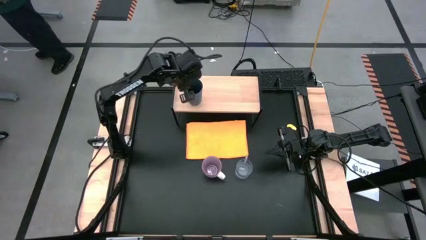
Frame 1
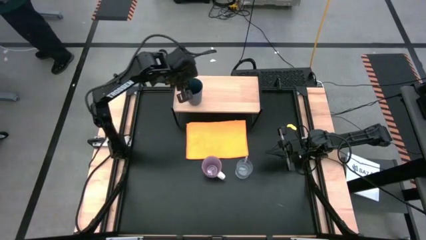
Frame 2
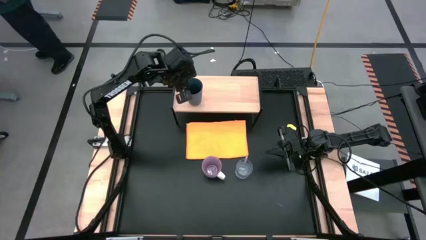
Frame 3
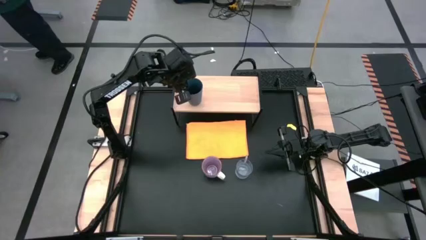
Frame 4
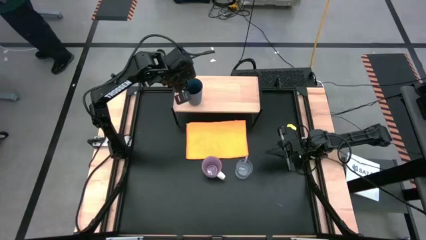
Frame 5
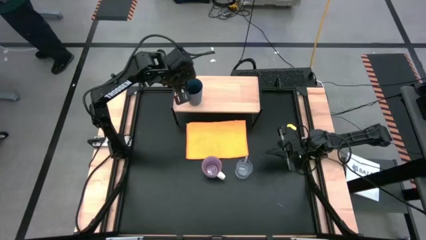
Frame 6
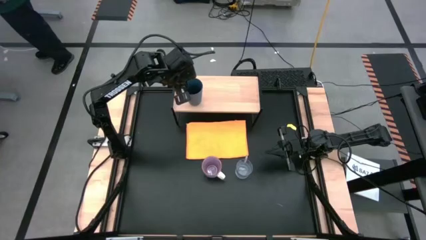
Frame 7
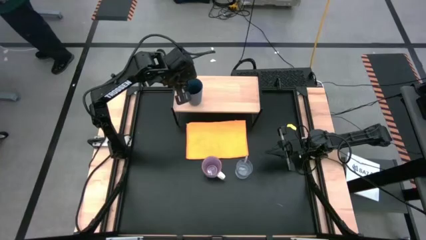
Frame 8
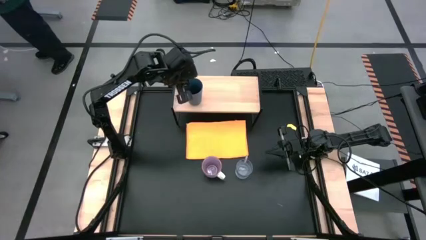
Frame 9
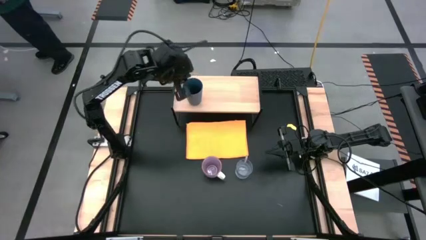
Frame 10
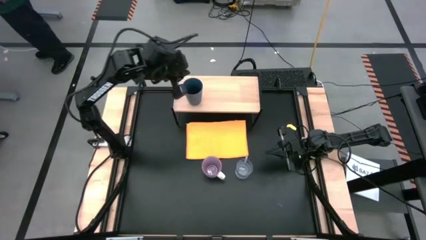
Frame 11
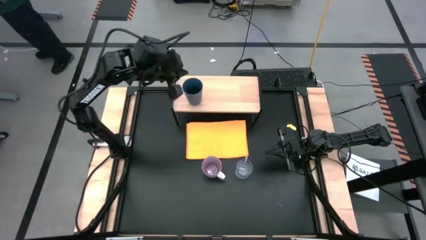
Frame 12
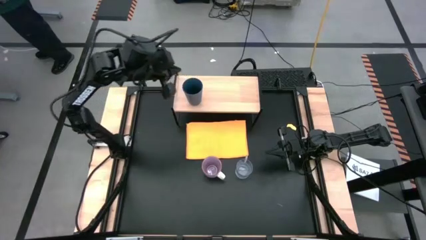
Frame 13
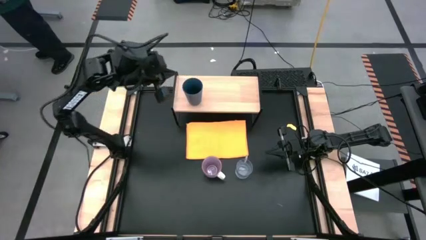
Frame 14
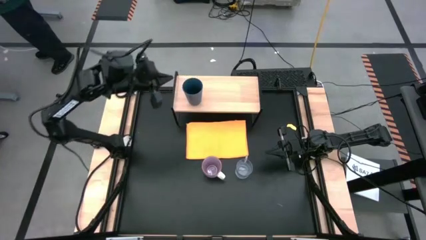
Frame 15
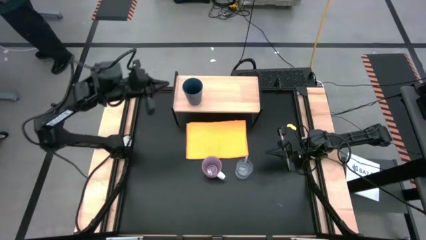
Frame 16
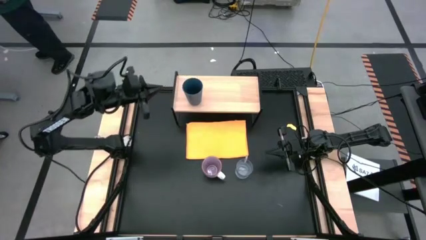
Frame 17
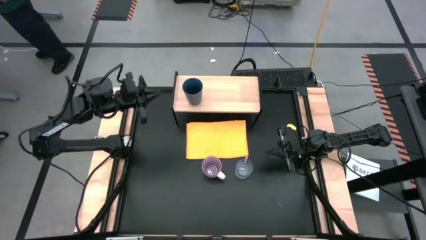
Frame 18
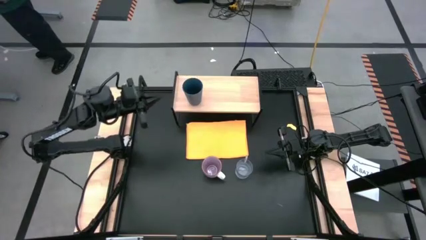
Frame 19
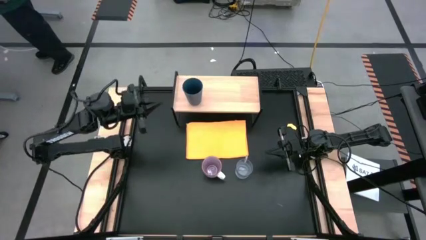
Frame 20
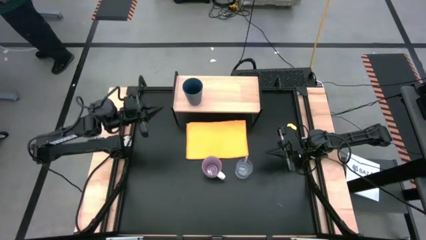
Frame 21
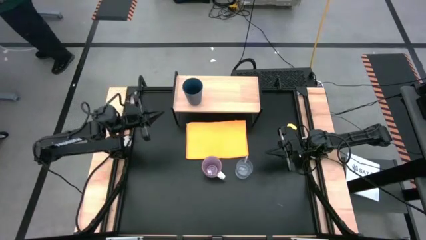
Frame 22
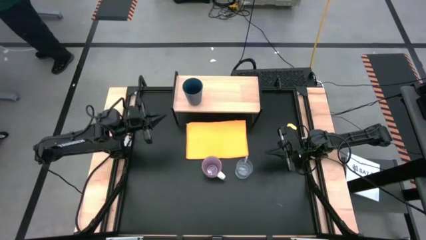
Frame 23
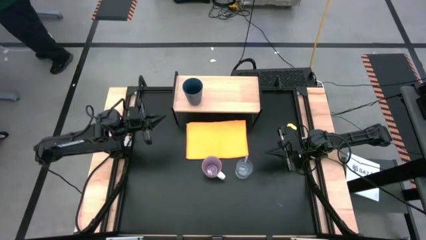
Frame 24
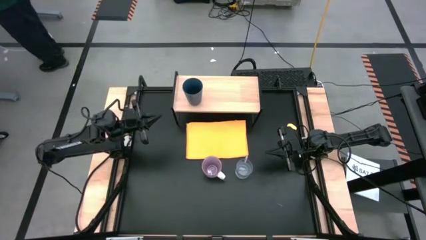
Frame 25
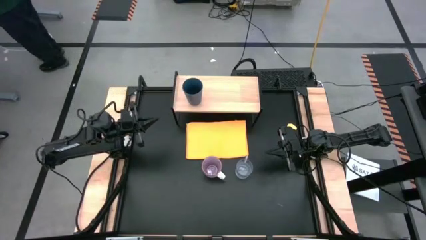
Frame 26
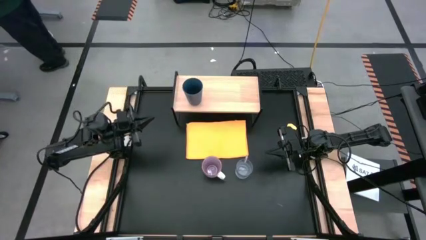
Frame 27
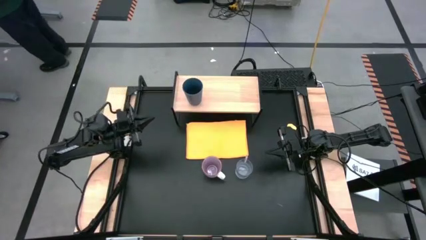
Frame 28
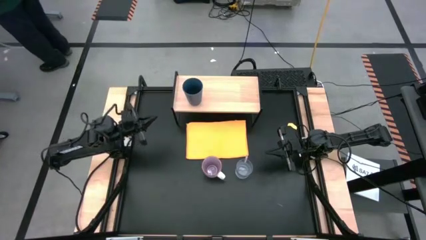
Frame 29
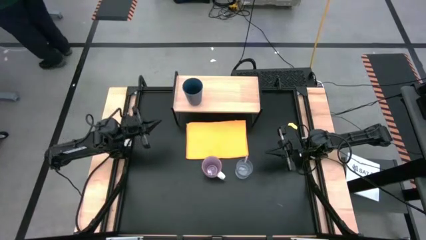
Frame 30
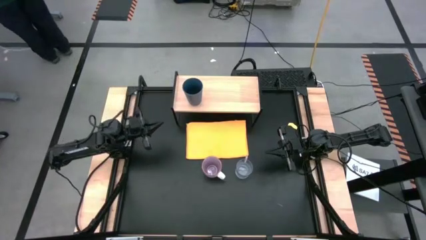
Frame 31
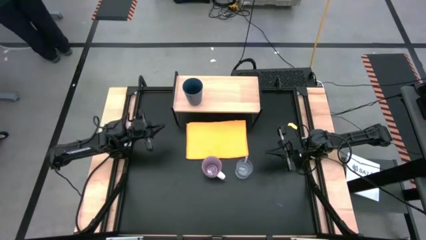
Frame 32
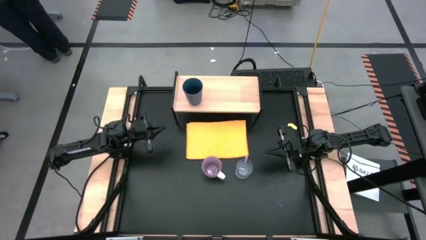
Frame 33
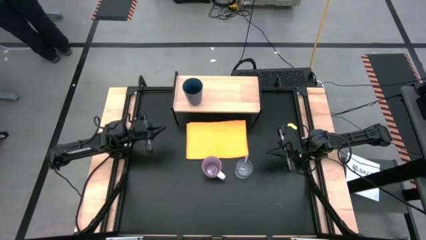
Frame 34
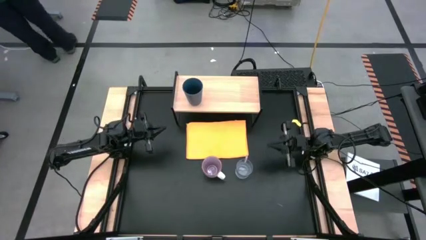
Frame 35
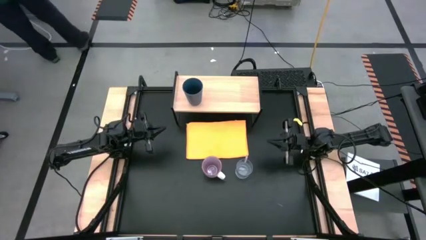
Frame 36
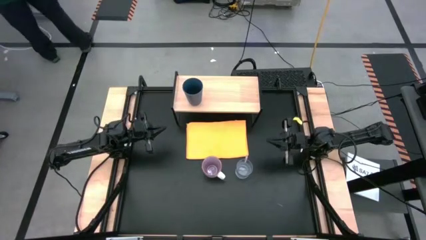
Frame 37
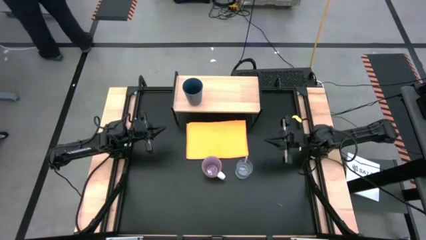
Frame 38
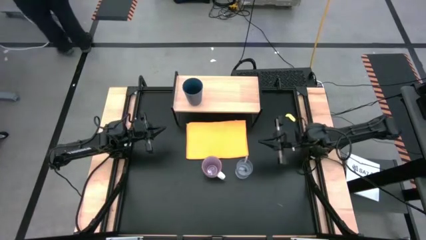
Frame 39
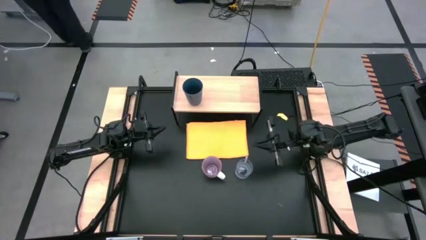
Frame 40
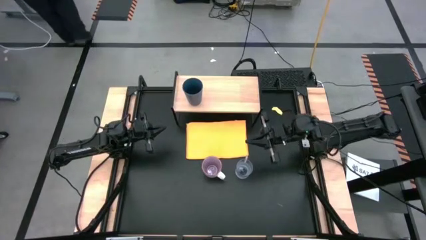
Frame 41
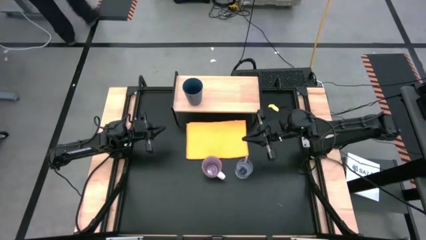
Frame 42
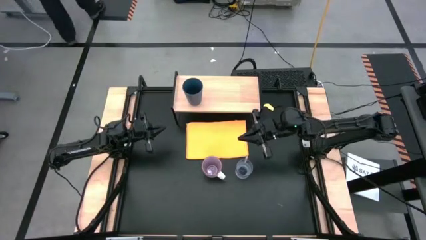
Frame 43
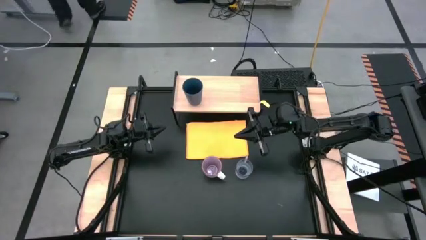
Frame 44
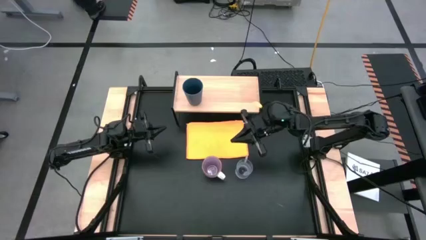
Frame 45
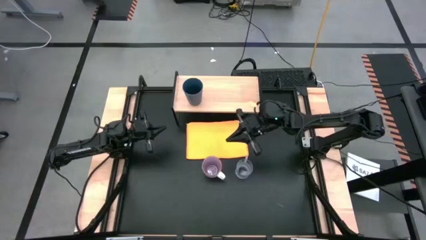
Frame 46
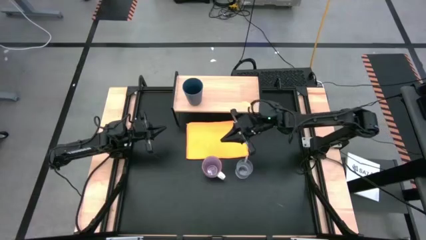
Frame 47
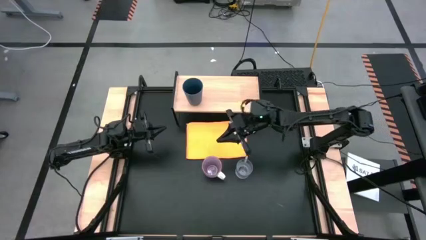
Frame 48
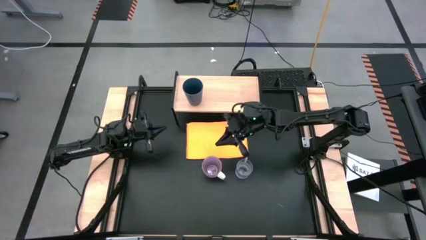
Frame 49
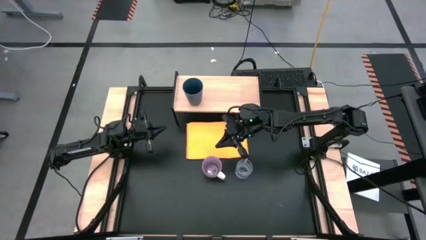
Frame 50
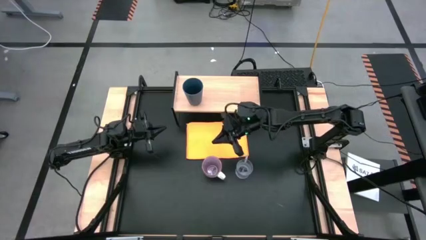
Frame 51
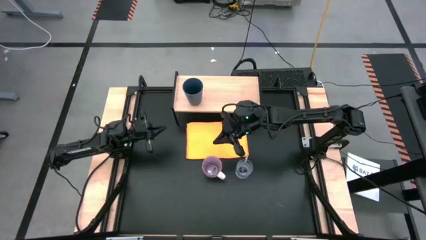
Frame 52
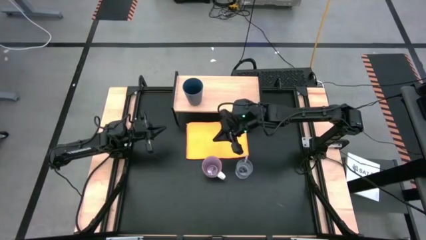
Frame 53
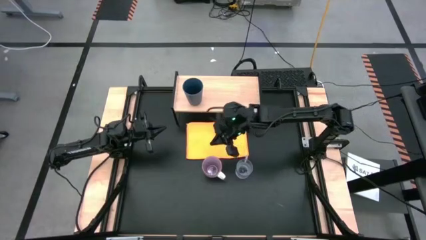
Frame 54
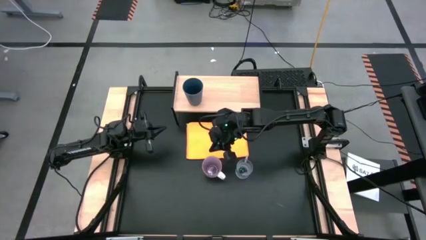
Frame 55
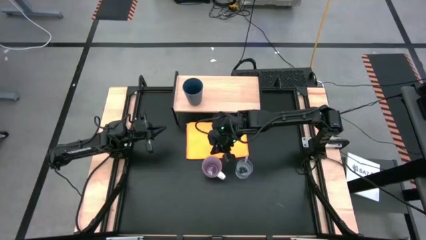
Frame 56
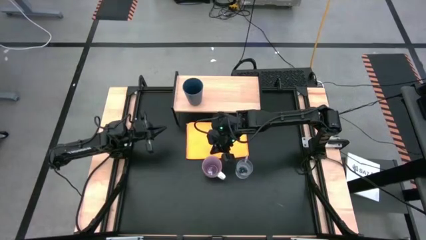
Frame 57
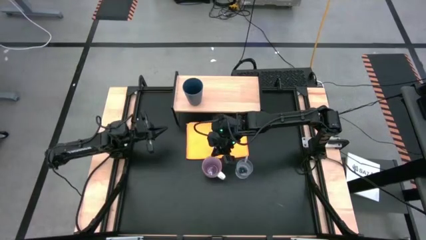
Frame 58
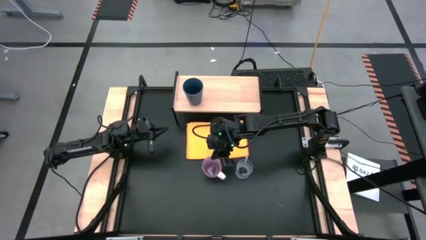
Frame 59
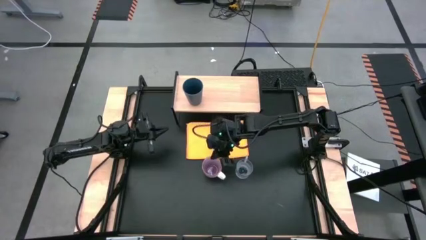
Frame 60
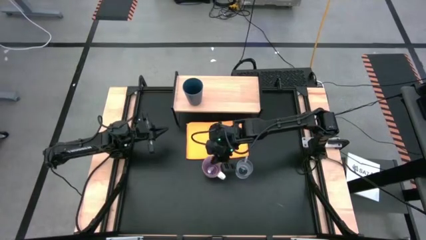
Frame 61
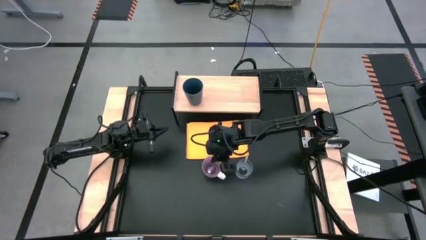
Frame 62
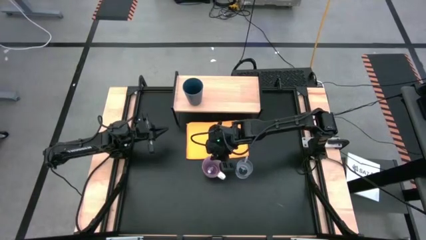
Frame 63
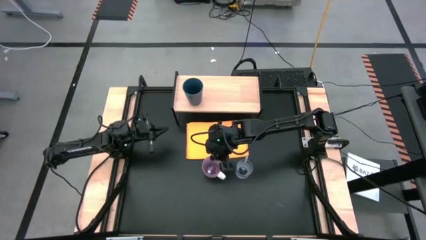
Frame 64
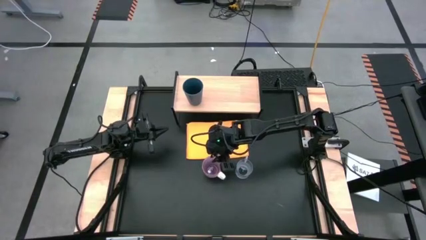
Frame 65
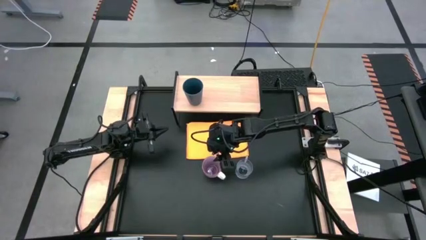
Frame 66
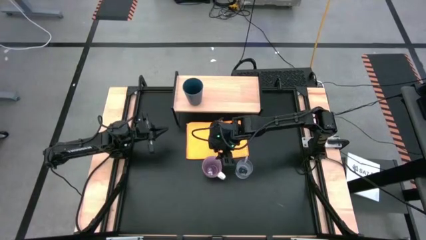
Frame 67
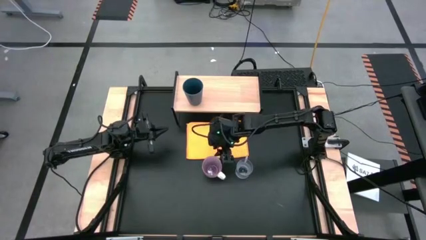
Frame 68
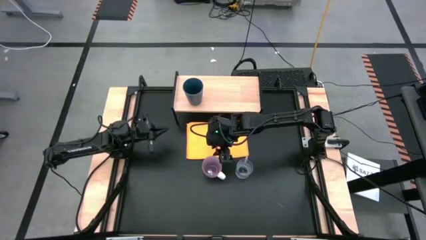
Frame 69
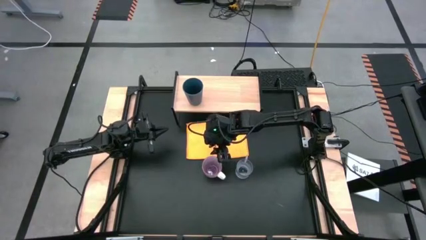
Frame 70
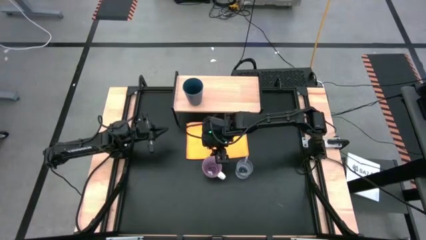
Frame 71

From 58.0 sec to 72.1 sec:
Task: Stack small to large cups/mugs on shelf
Put the purple mug on the shelf

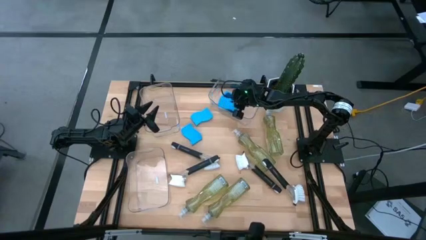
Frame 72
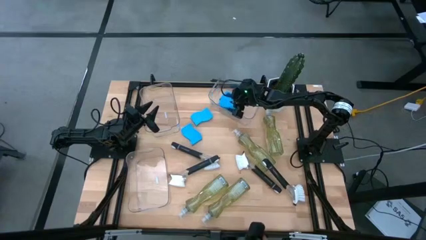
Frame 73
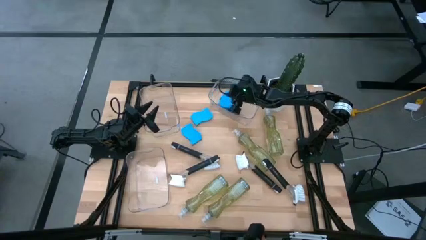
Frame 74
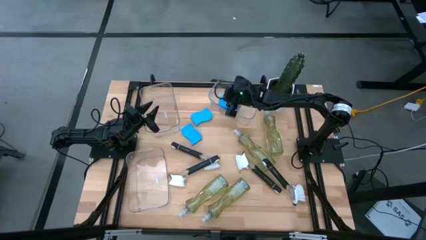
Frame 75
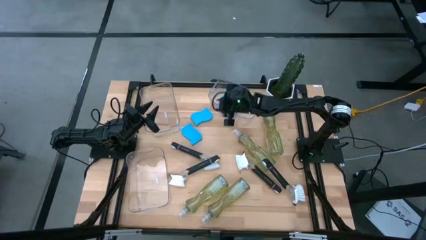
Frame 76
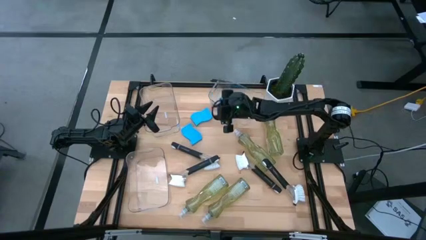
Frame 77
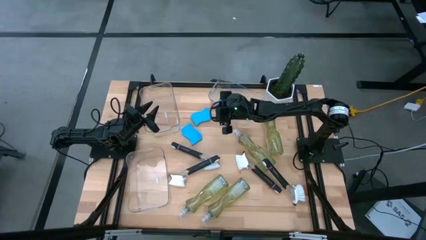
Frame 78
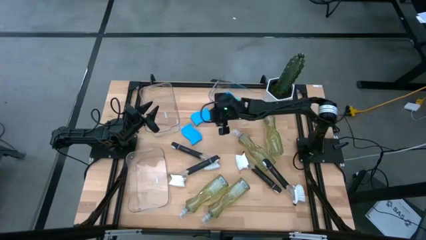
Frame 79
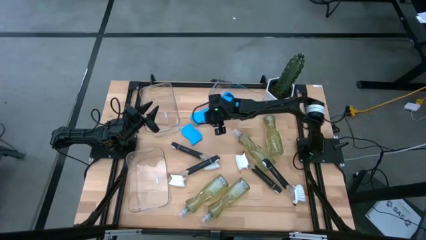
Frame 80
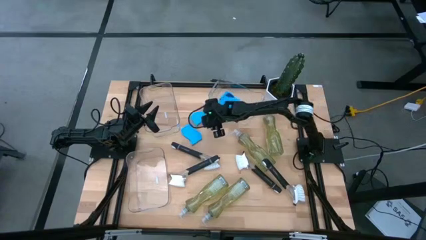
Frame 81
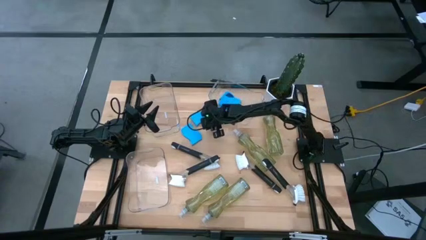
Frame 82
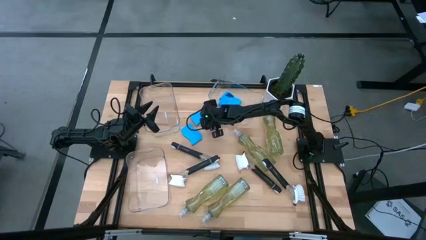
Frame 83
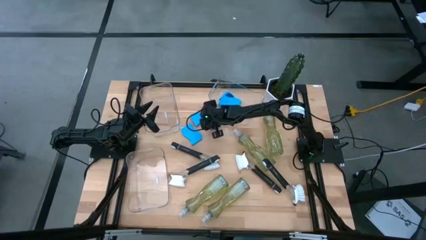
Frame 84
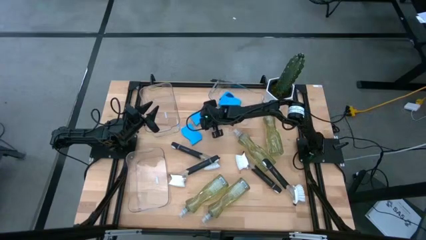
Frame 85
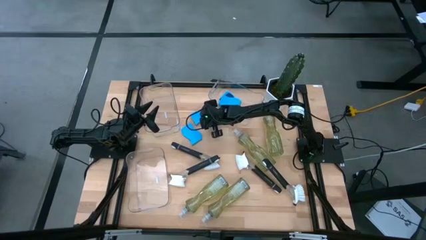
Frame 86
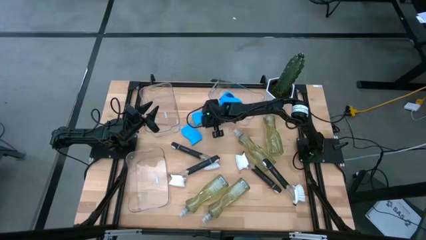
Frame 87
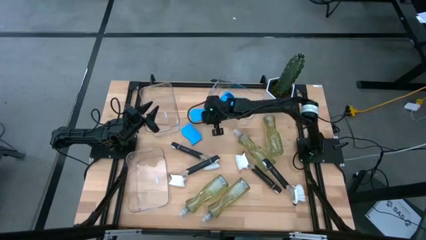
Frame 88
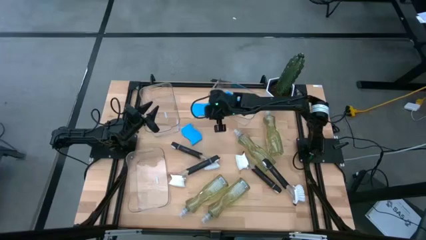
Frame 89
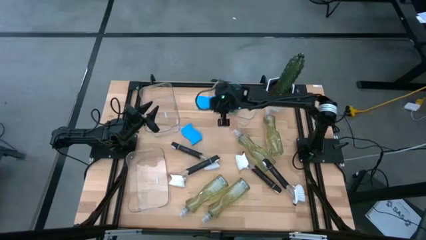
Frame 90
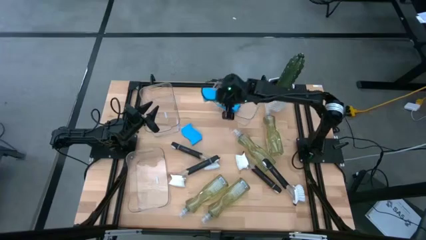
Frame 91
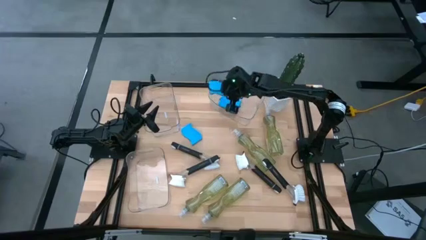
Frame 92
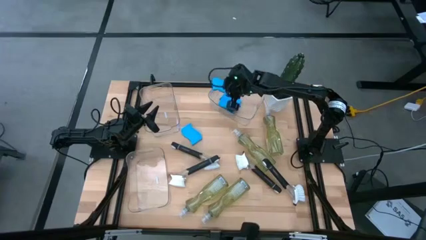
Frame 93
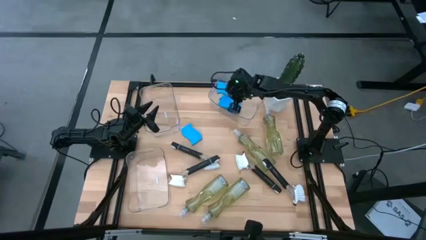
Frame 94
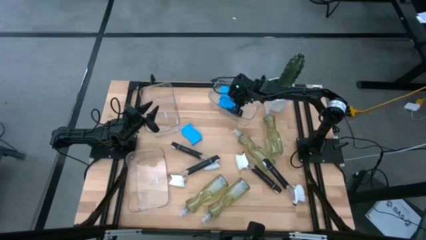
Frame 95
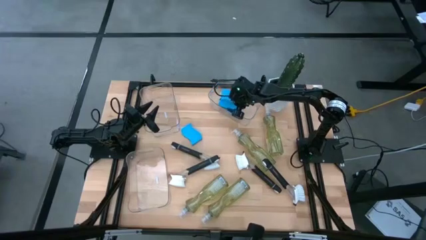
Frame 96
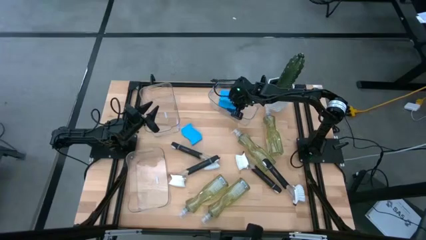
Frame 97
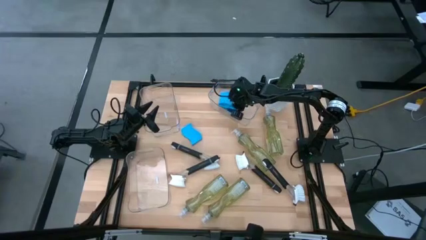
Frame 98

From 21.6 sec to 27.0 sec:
Task: Pick & Place Kitchen Sink Supplies
Put the blue sponge into the top right transparent bin
